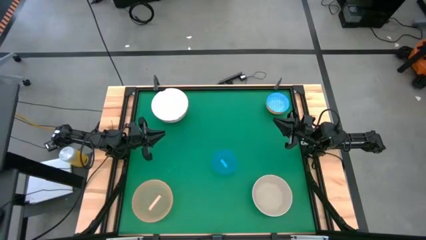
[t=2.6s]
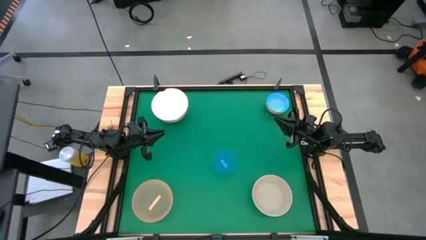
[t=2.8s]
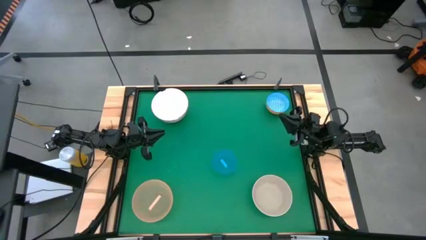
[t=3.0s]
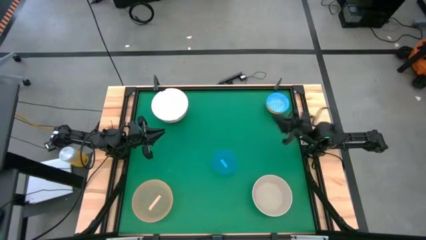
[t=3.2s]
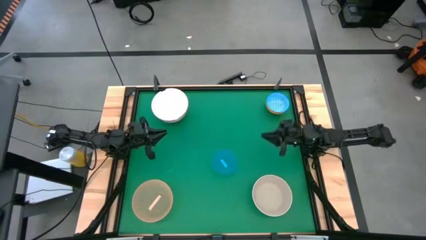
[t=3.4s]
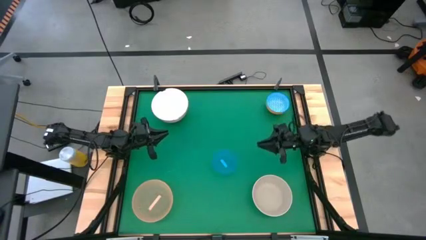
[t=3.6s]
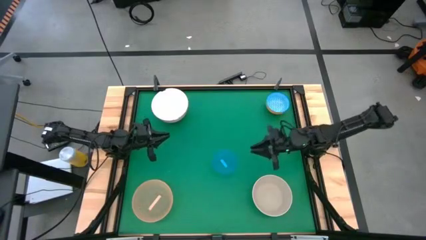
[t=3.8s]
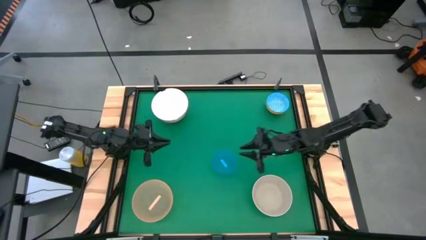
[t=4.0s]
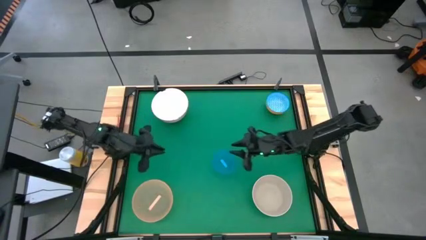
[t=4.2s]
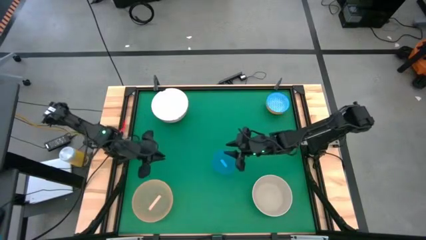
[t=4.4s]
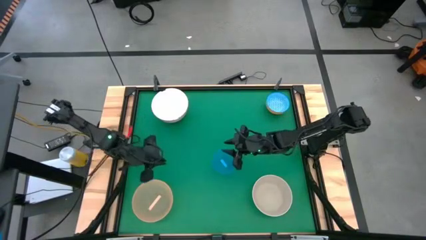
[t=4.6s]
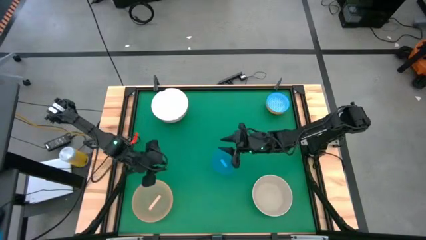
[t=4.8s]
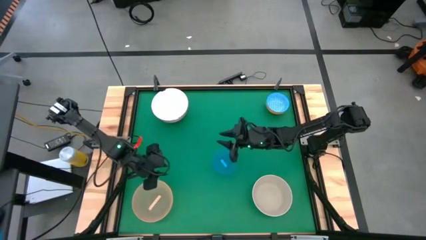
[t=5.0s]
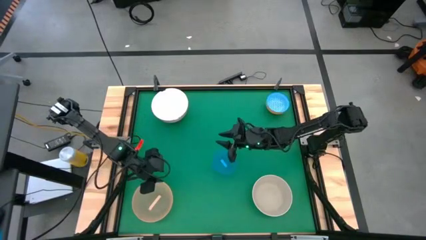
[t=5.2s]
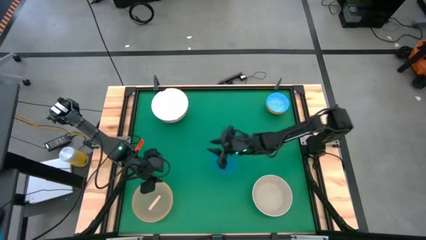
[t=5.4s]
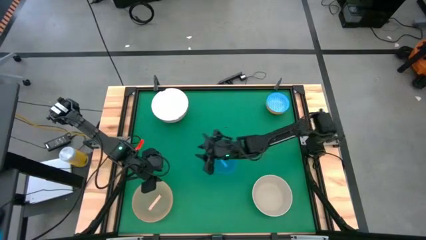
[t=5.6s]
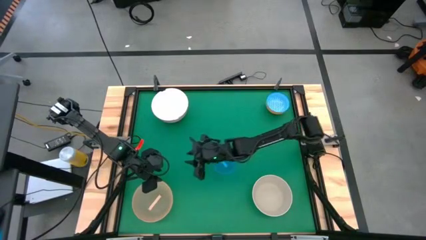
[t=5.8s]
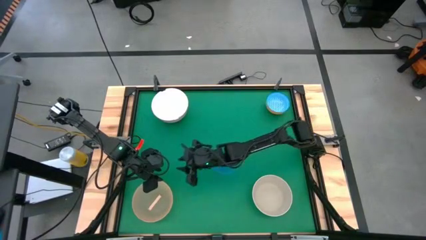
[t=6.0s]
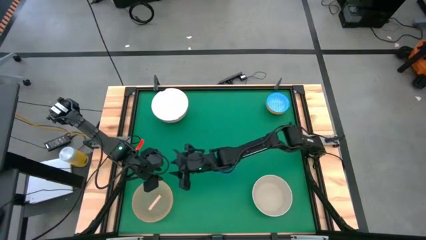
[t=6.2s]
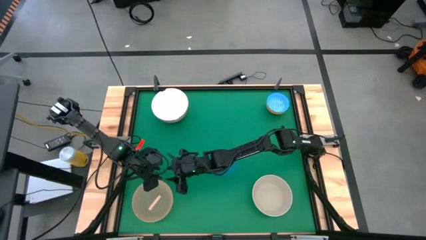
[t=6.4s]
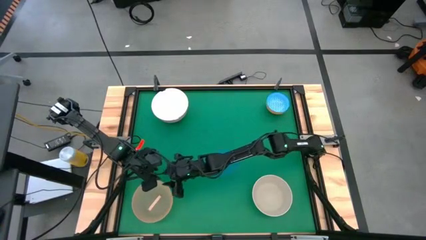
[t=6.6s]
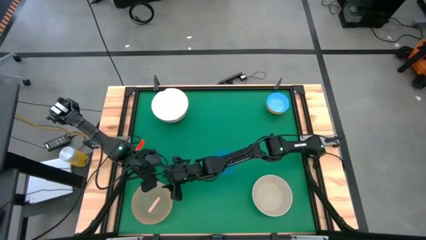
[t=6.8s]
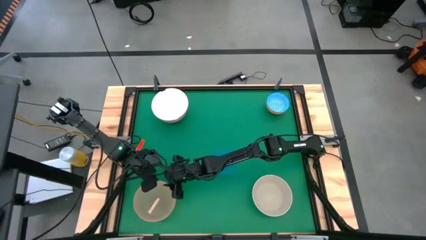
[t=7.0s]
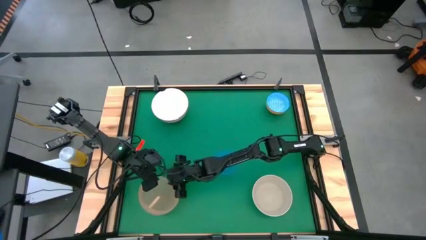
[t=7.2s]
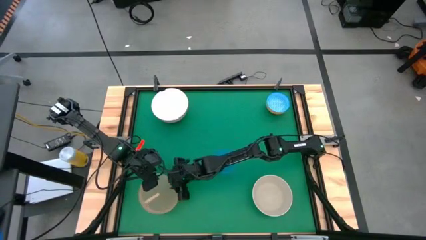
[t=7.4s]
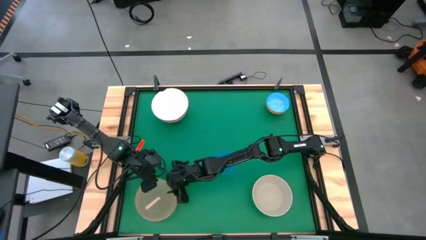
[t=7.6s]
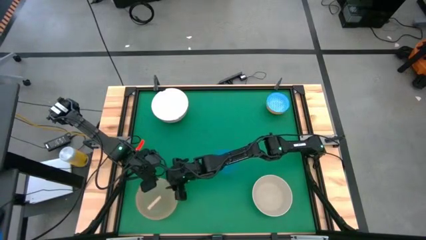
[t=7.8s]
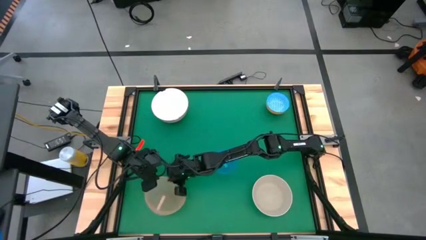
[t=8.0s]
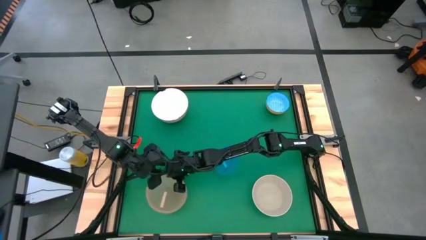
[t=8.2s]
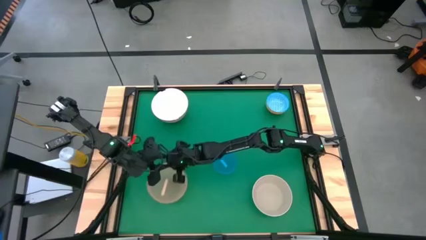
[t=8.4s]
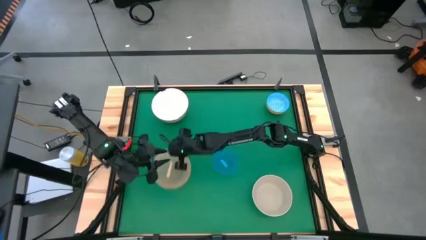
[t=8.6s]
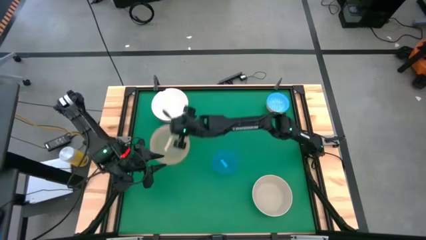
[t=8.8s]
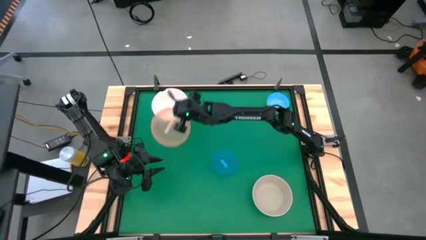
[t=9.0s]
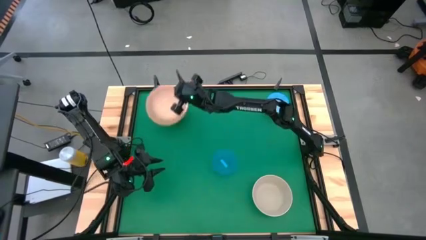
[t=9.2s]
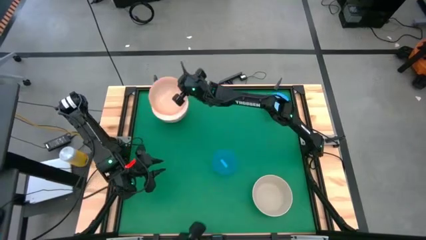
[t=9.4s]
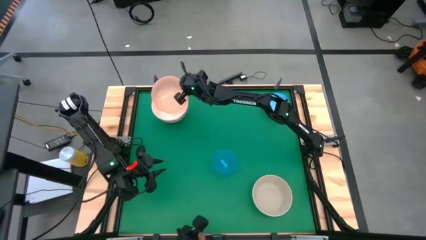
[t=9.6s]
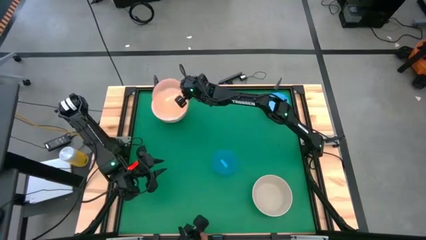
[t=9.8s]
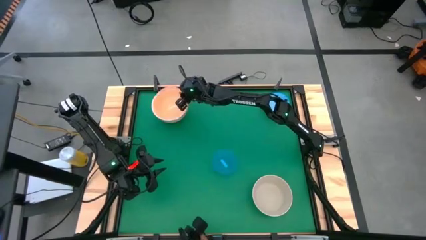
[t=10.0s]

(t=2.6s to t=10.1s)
Stack the orange transparent bowl on top of the white bowl

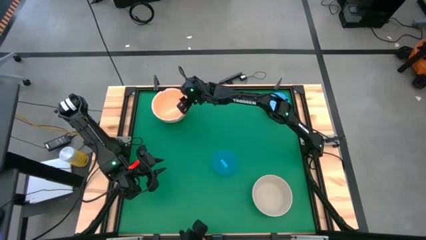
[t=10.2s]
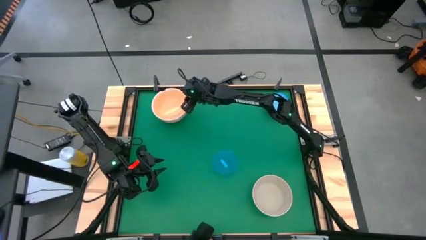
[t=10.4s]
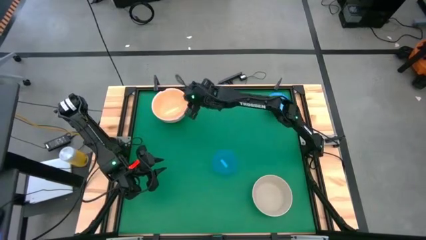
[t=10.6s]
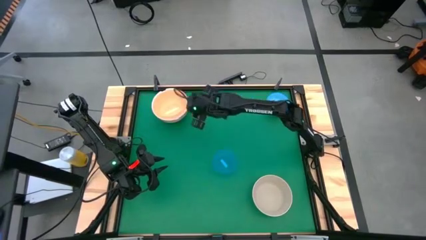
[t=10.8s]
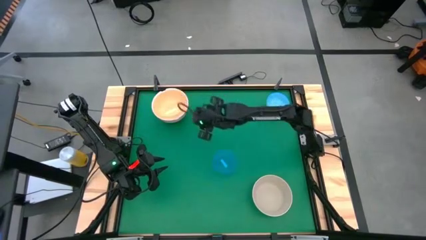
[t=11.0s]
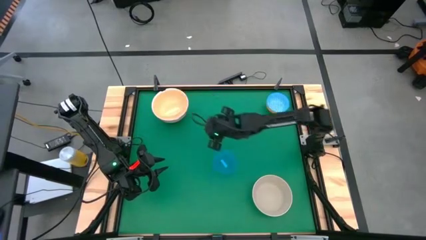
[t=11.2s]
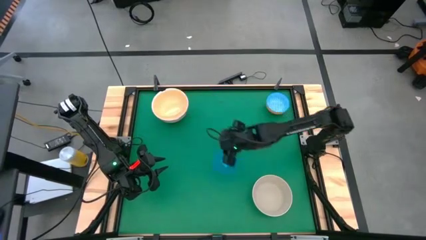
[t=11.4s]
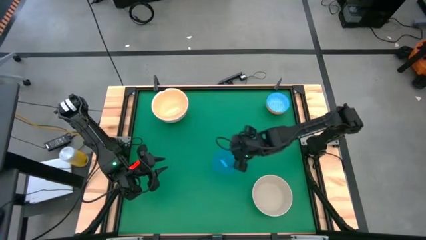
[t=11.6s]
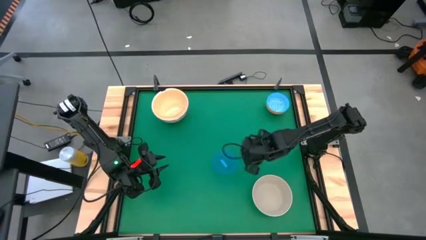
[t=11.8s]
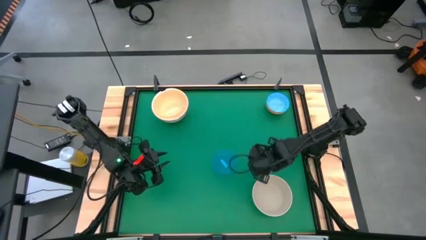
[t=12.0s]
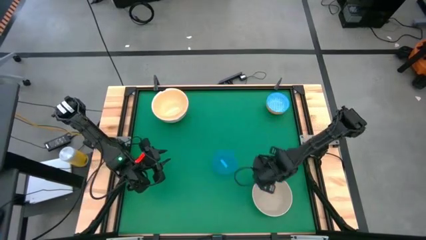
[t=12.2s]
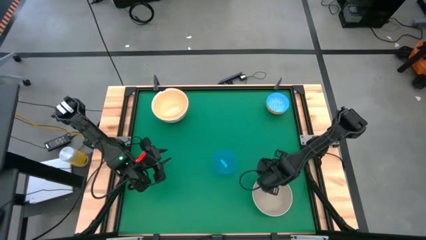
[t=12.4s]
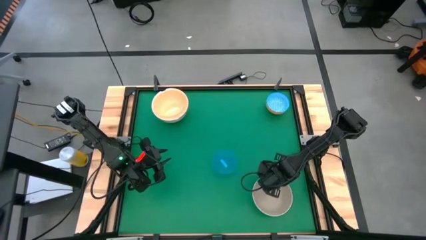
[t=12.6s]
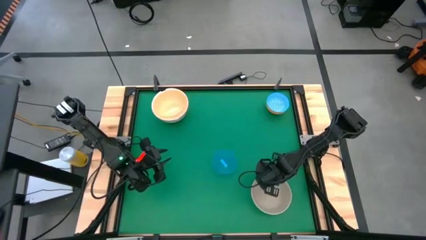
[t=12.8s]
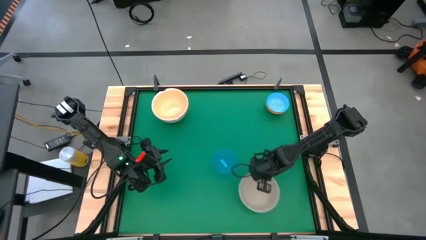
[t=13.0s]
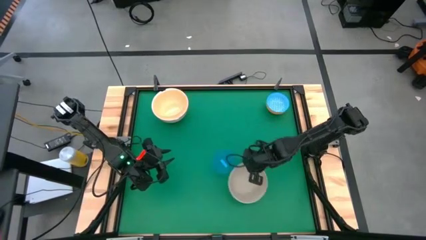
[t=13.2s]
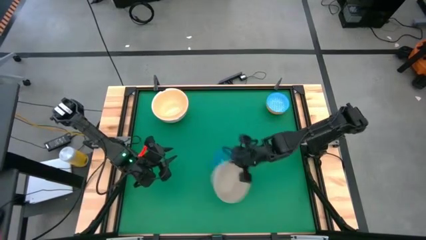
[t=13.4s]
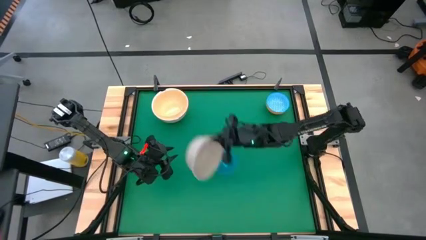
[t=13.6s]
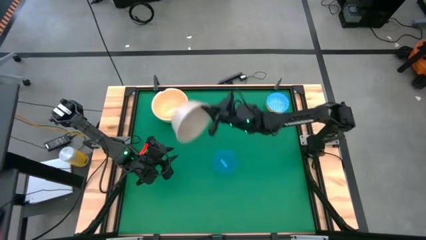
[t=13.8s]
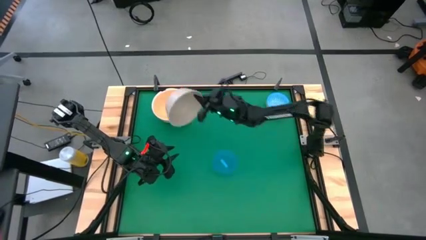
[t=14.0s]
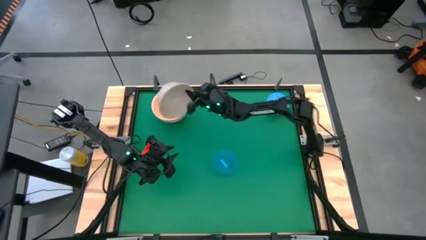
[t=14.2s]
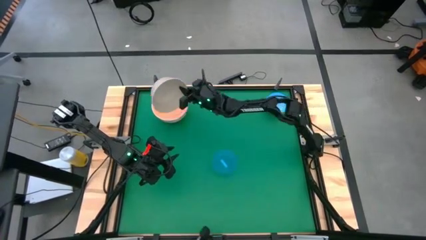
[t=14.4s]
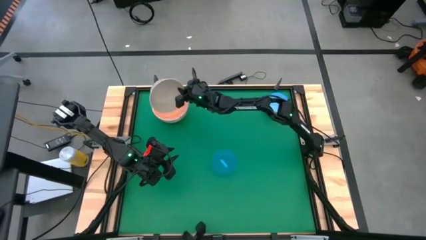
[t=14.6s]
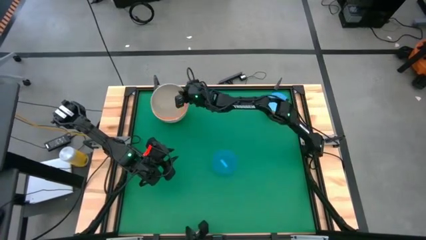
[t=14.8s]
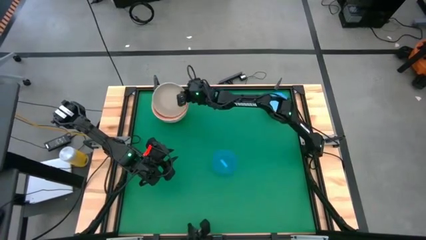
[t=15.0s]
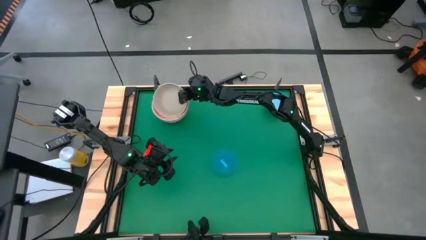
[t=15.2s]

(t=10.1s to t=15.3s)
Stack the gray bowl on top of the orange transparent bowl

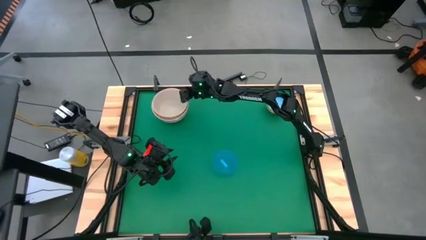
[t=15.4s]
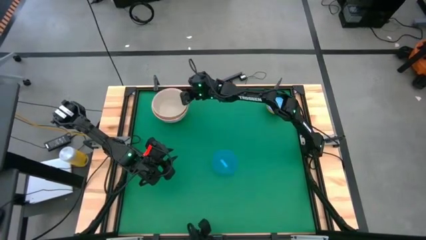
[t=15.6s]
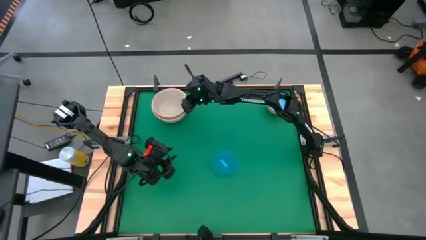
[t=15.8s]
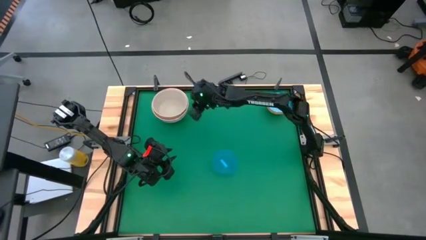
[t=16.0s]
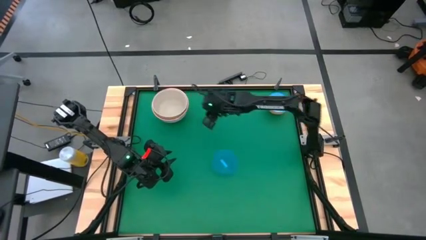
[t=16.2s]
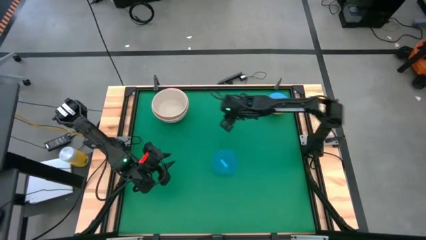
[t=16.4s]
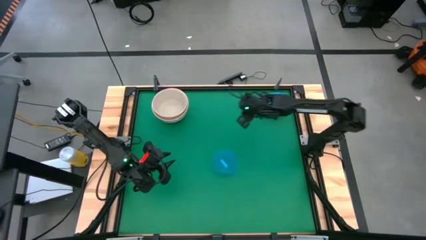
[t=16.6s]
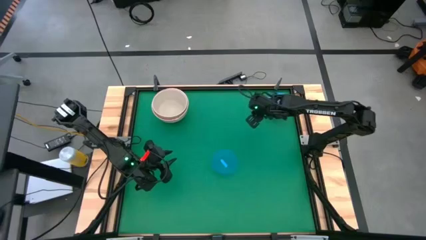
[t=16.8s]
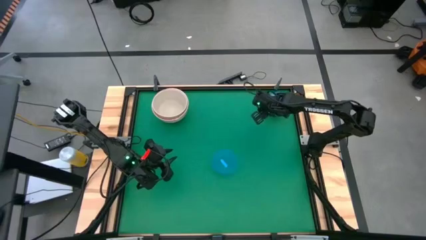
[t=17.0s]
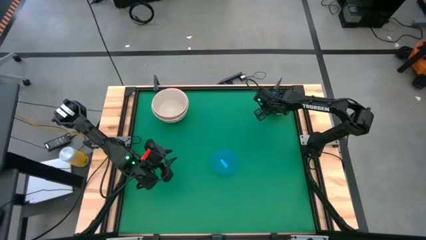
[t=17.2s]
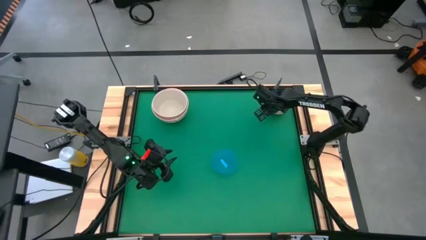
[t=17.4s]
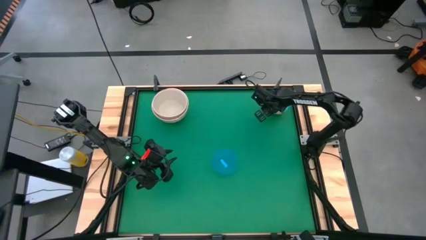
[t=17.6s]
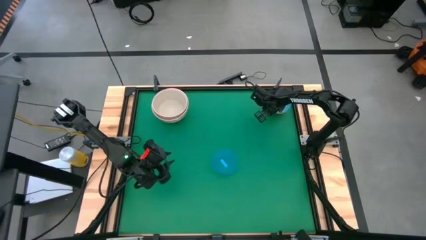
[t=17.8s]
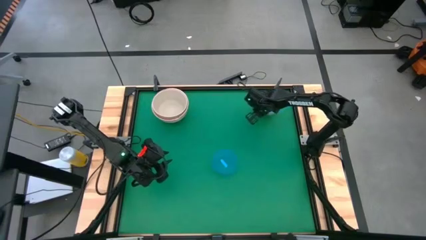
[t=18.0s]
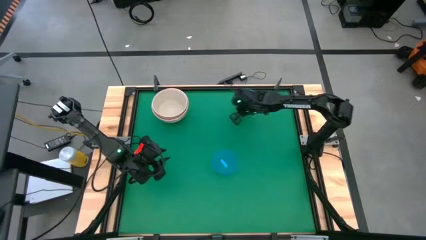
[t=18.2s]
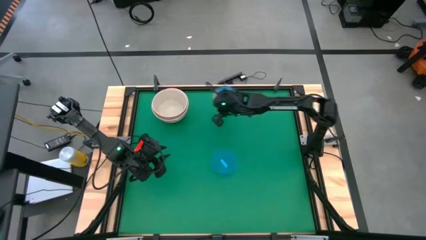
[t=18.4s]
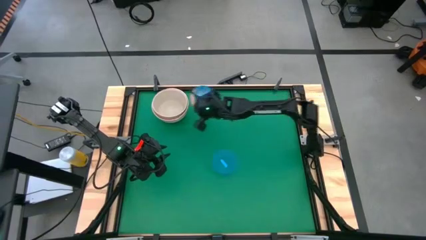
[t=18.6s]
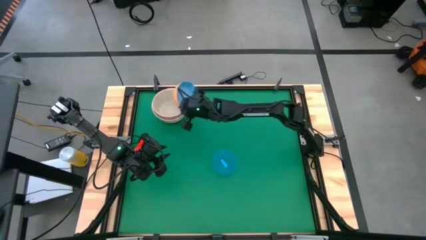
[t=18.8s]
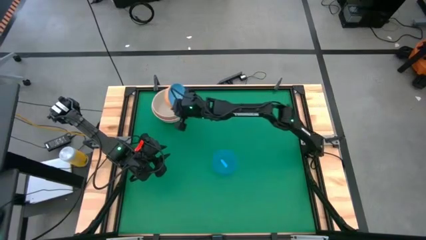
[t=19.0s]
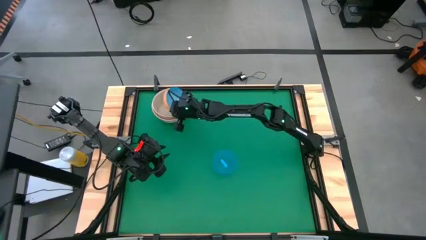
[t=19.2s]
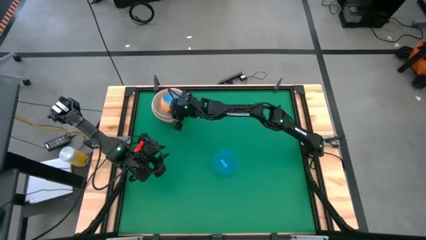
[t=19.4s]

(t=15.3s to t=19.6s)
Stack the blue patterned bowl on top of the gray bowl
